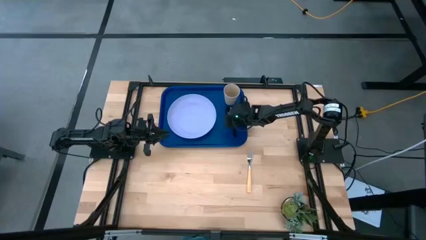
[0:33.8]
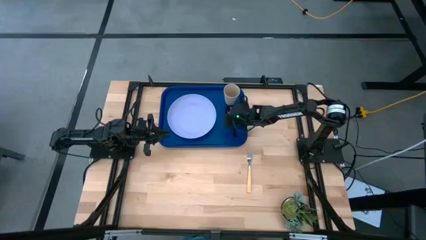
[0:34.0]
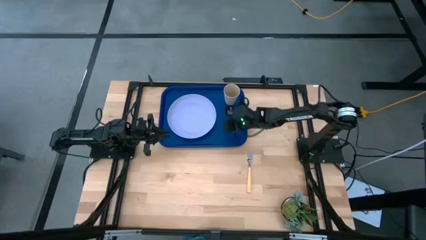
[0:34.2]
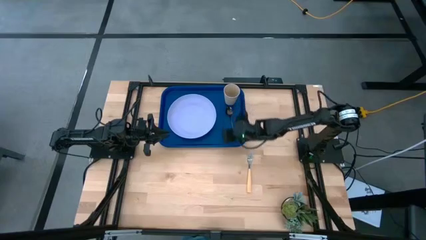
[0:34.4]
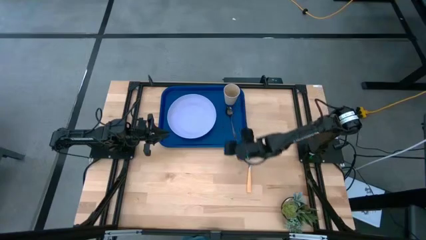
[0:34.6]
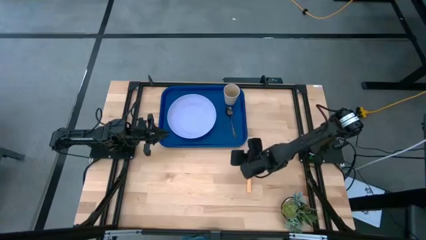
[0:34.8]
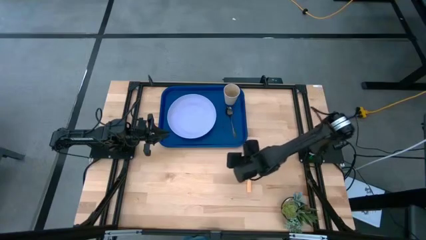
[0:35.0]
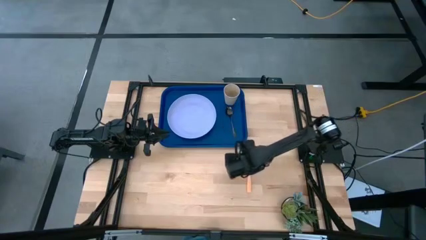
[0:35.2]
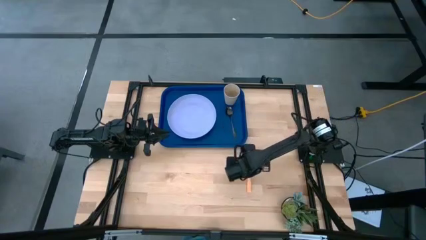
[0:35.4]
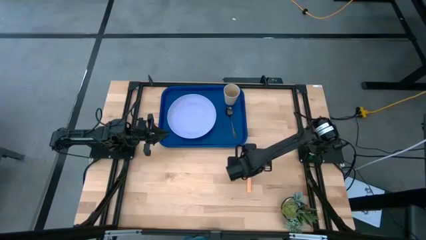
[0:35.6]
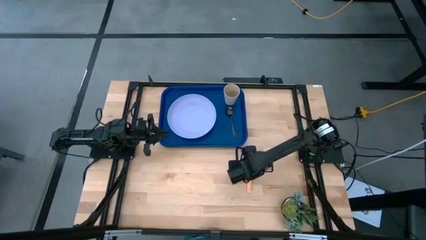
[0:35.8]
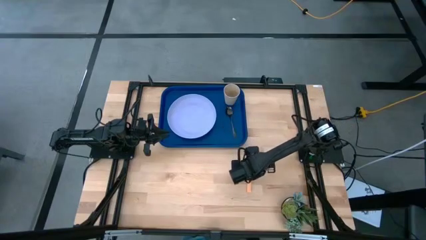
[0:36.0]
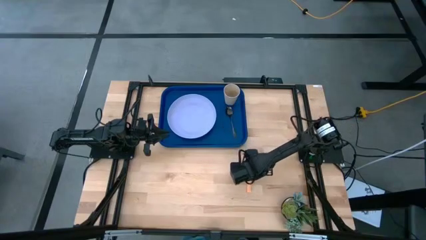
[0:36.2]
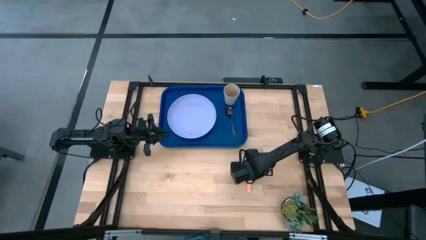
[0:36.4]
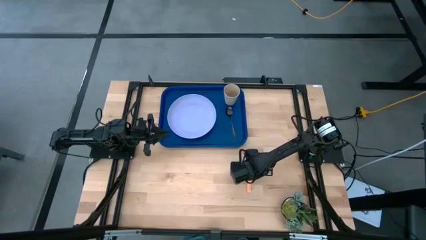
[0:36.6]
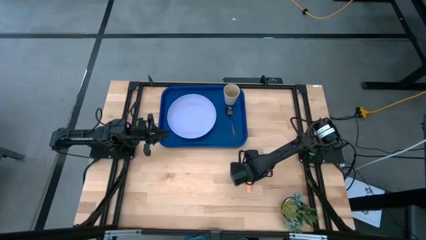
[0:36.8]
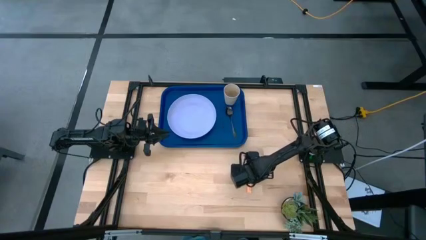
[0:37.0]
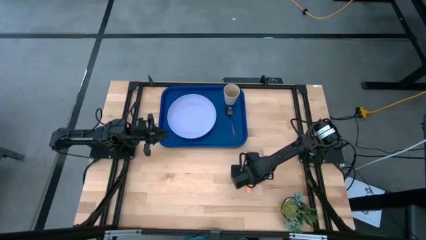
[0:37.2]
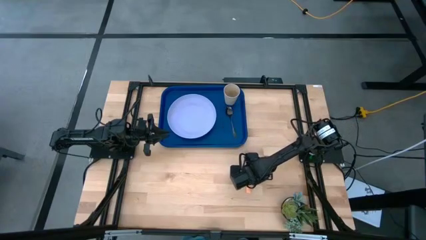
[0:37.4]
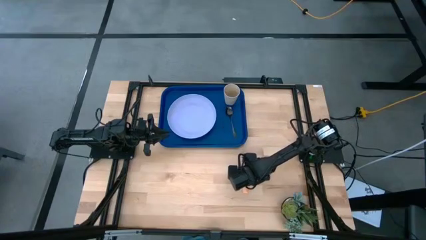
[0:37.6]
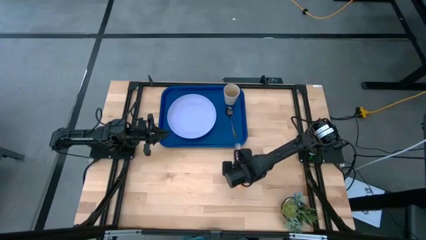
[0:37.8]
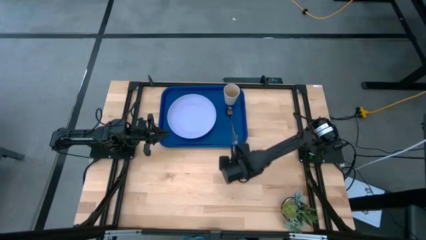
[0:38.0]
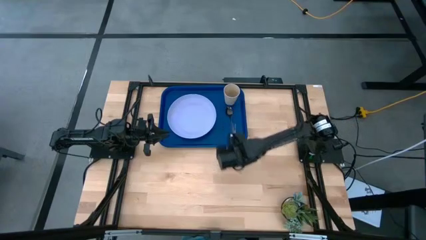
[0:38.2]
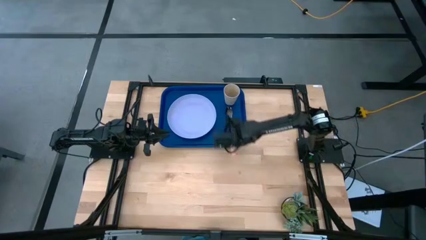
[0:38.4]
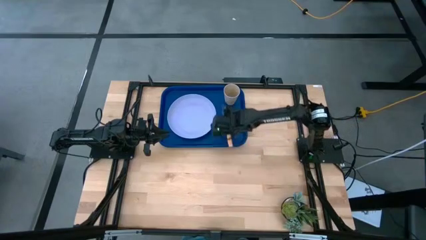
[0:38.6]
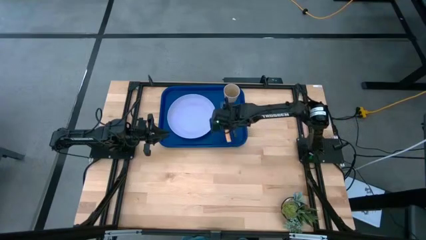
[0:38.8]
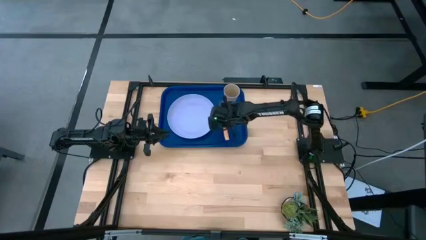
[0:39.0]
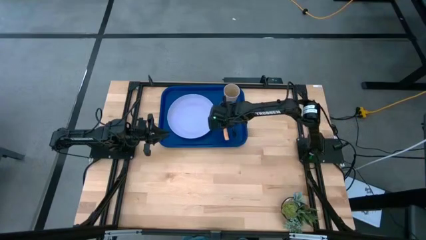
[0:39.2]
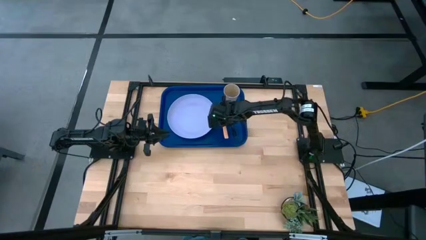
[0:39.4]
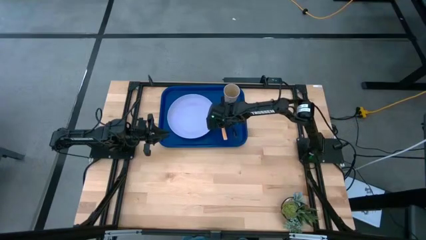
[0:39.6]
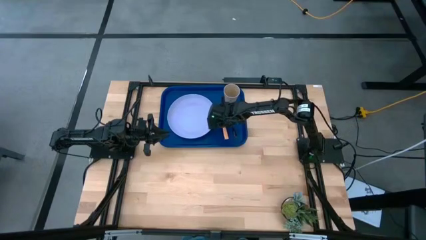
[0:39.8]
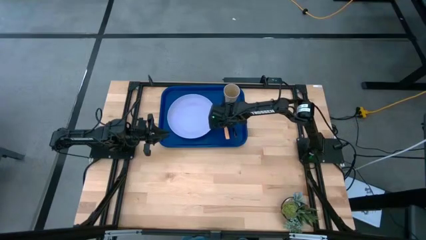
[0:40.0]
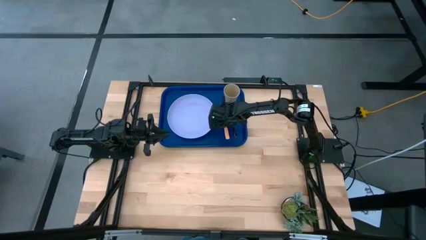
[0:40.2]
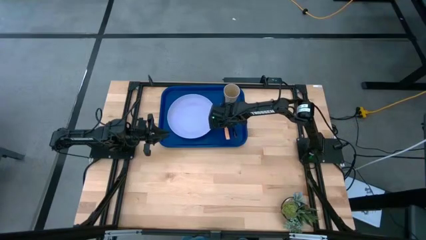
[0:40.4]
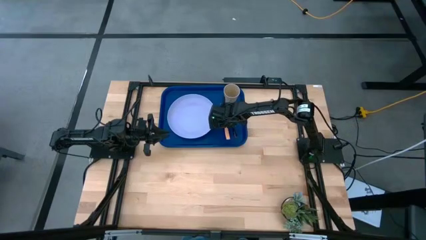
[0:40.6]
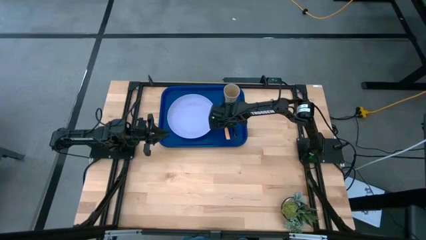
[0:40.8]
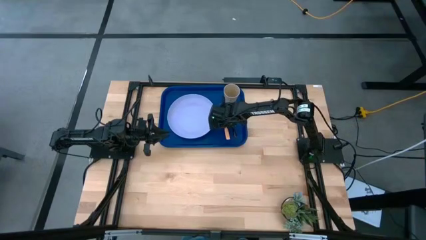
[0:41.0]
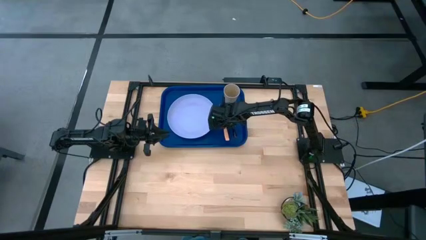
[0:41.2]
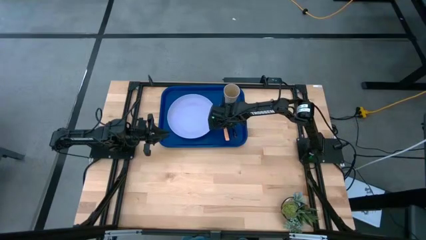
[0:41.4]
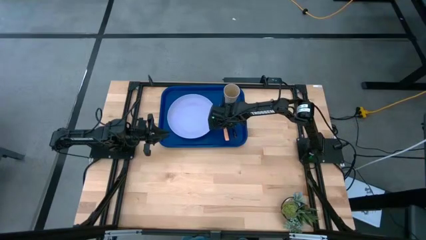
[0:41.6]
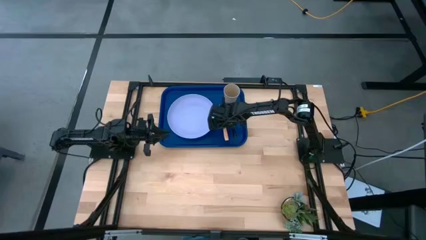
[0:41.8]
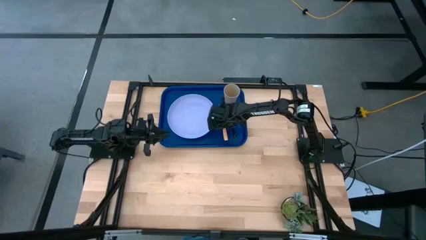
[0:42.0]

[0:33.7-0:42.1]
Task: Pick and place plate/cup/fork/spoon on tray
Put the yellow fork on the tray

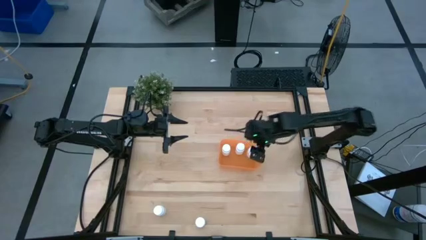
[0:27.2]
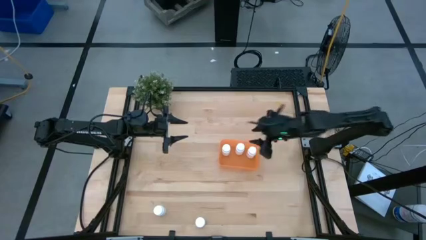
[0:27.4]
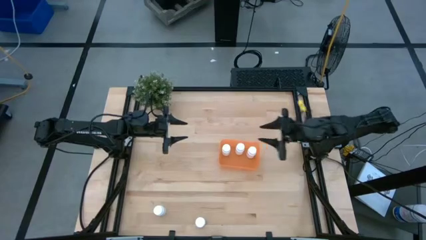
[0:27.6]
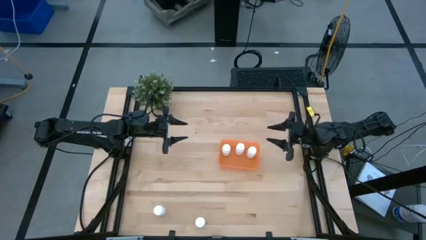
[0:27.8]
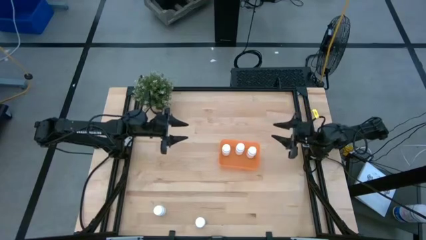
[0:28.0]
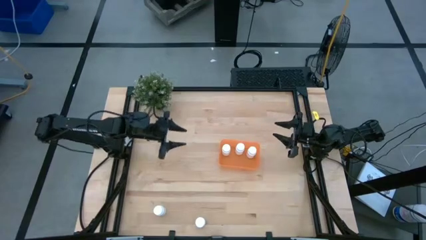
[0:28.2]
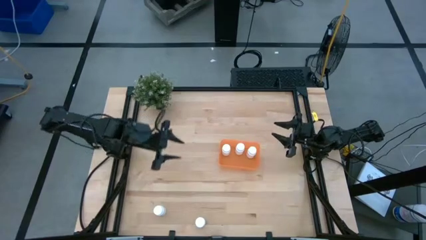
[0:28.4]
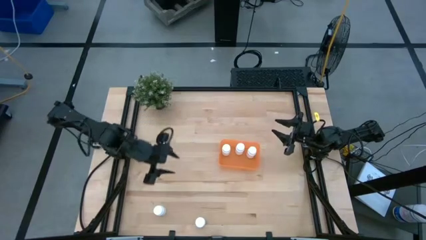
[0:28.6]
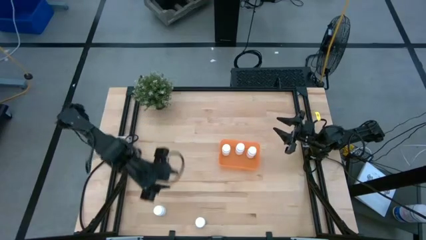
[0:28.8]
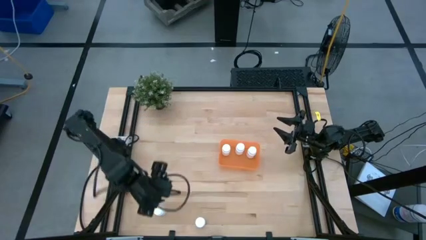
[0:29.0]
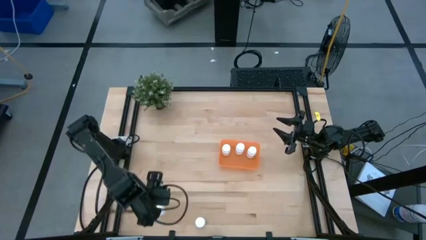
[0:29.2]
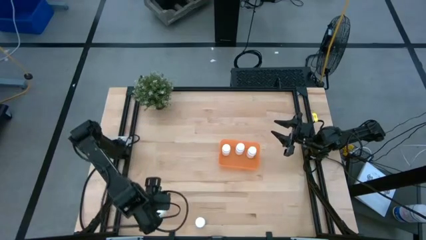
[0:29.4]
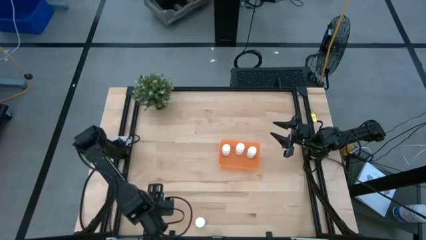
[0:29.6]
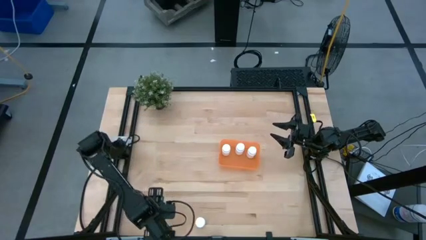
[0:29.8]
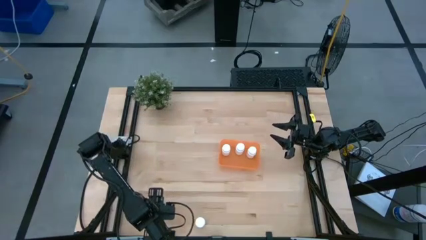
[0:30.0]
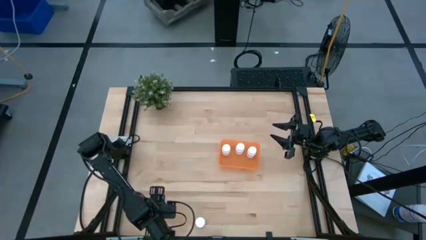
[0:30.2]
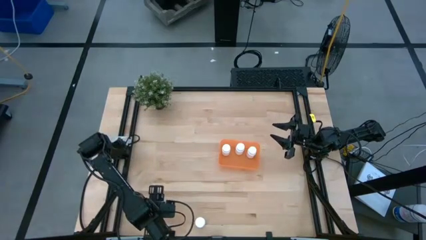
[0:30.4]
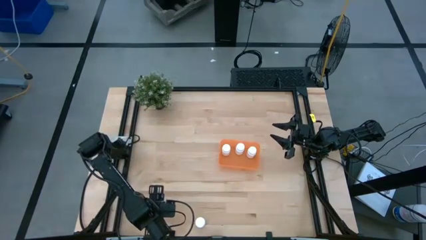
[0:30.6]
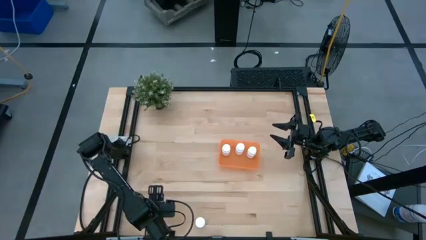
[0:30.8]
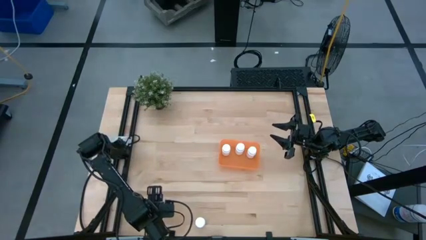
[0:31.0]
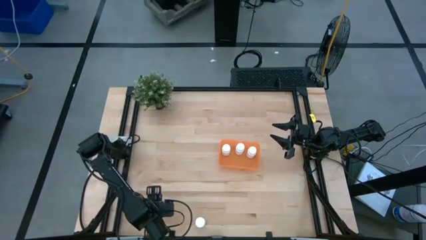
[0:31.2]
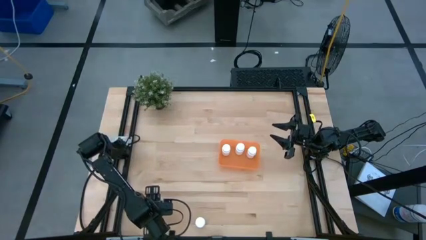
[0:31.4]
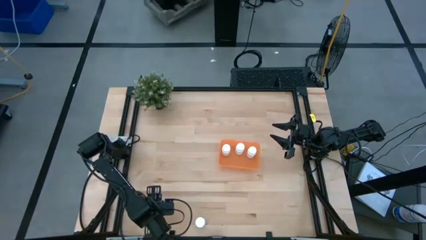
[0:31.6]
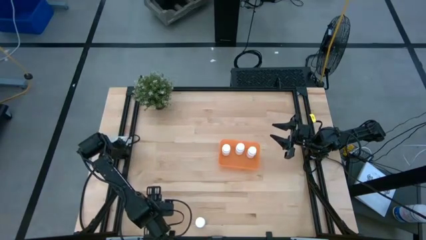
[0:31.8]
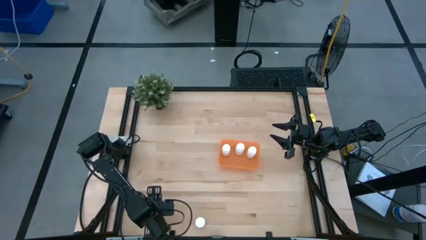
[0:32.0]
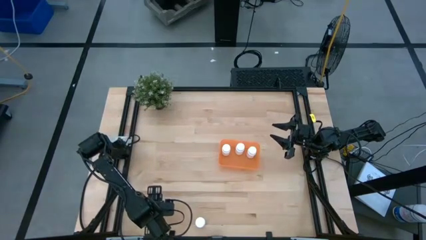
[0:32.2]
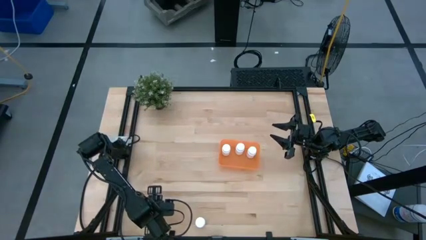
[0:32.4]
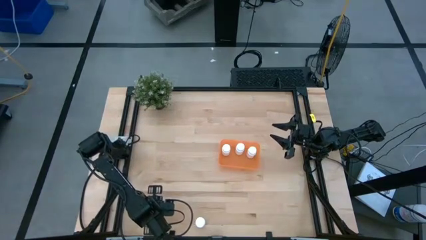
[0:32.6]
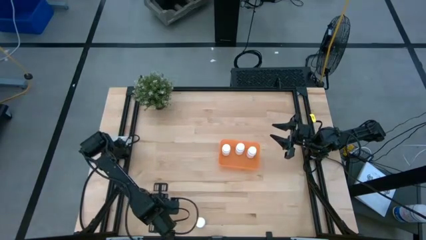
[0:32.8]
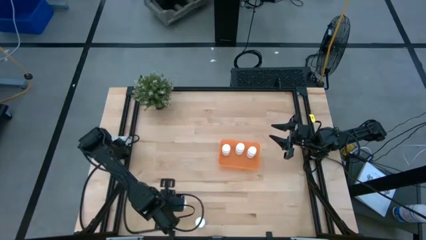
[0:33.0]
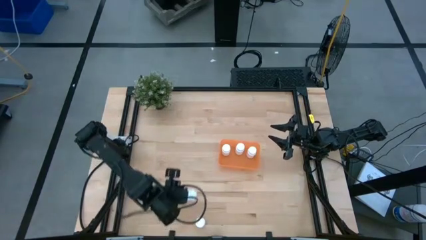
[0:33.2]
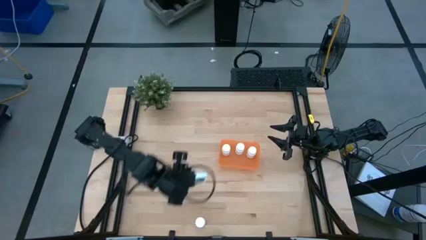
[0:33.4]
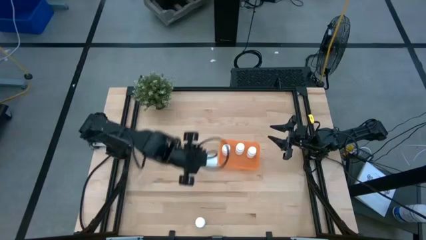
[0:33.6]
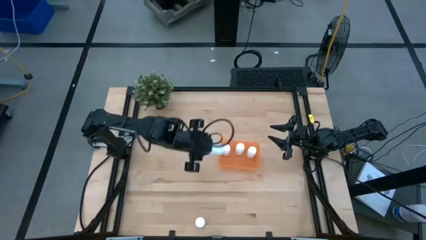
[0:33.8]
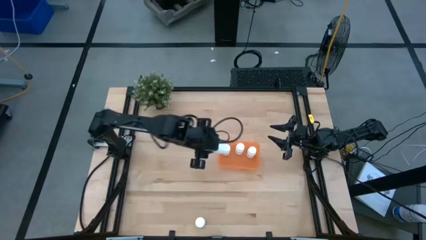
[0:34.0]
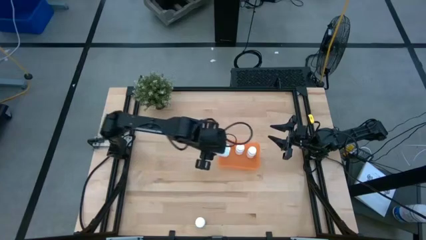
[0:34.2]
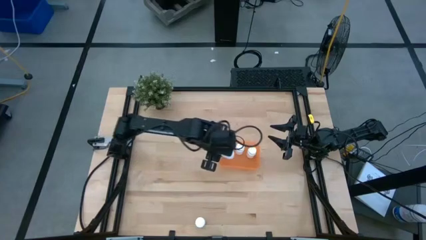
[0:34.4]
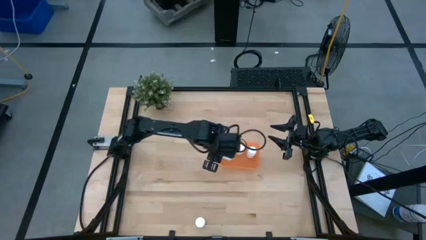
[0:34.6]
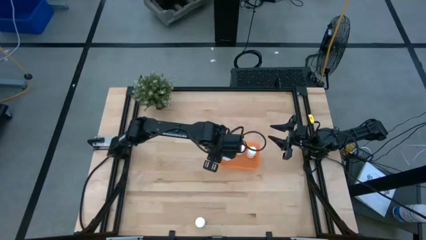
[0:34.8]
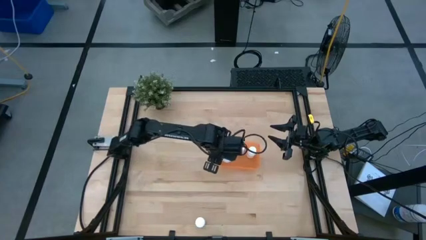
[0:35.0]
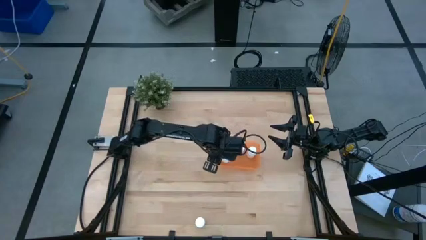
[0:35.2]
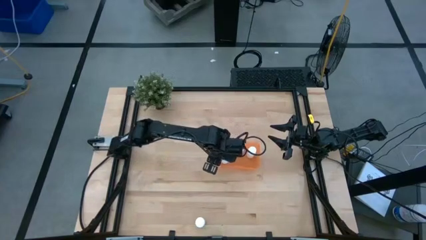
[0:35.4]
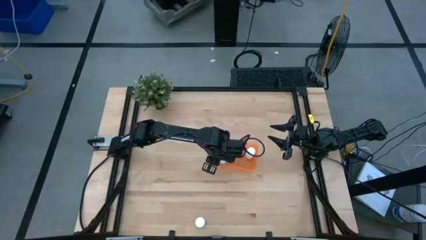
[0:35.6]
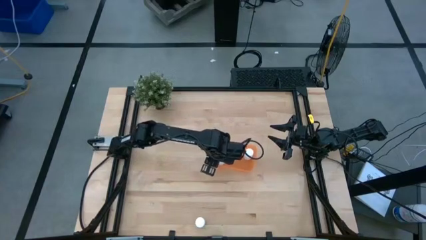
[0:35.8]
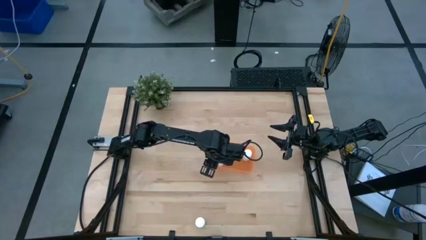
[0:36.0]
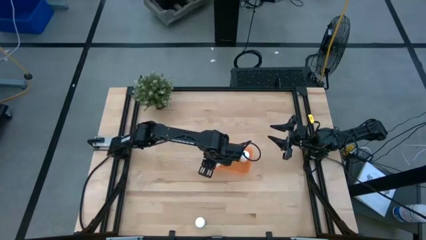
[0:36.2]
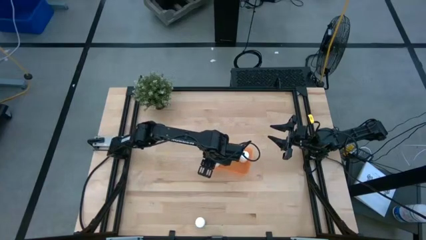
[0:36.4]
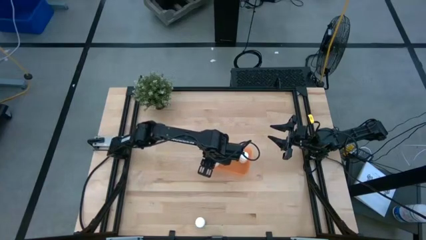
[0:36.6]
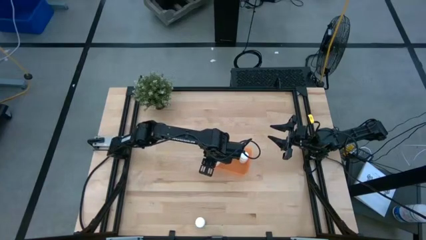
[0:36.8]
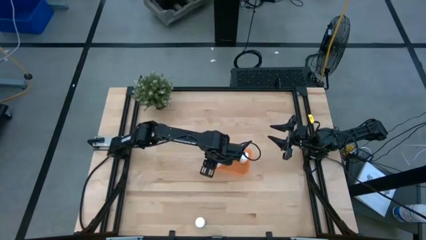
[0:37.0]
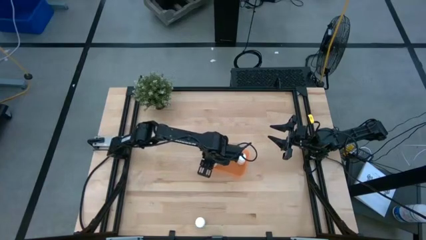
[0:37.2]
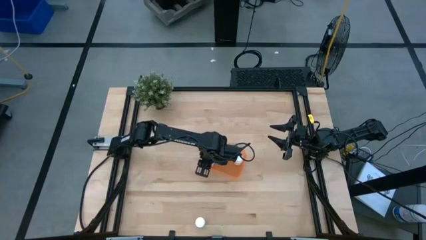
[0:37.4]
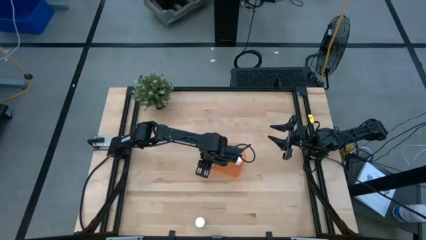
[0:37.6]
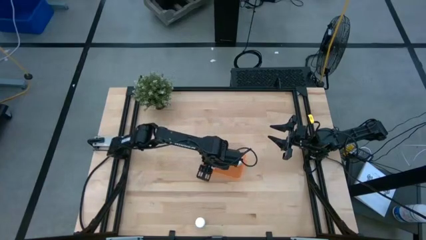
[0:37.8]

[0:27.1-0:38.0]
Task: Pick and place pill bottles into a basket
Put the pill bottle into the bin
